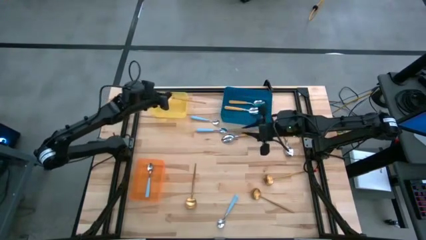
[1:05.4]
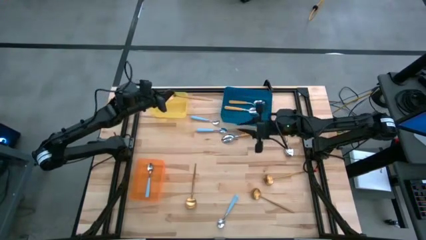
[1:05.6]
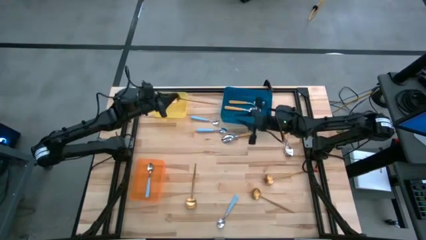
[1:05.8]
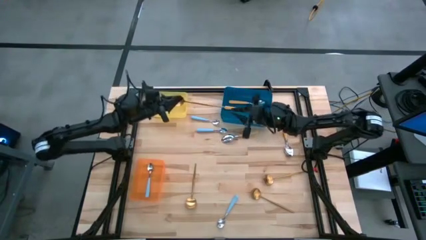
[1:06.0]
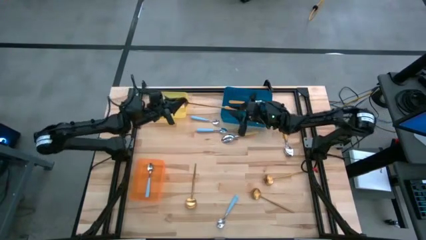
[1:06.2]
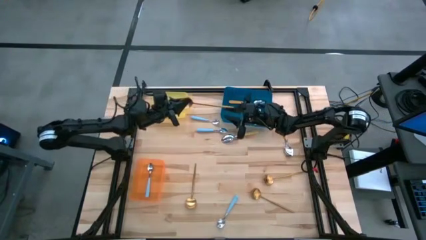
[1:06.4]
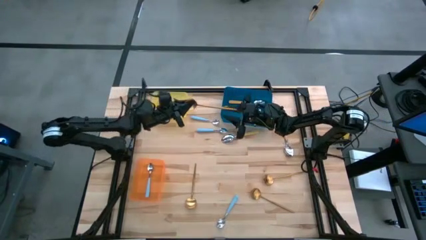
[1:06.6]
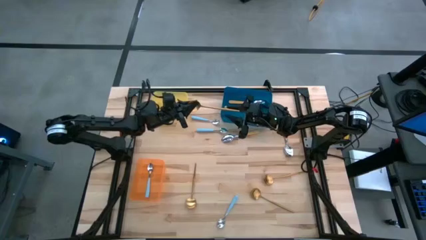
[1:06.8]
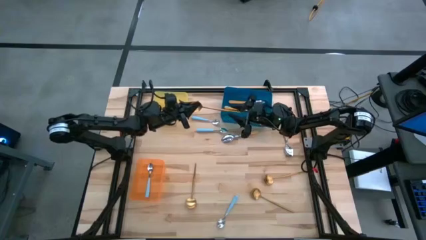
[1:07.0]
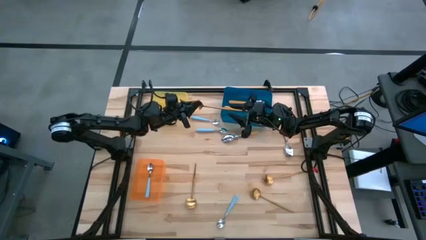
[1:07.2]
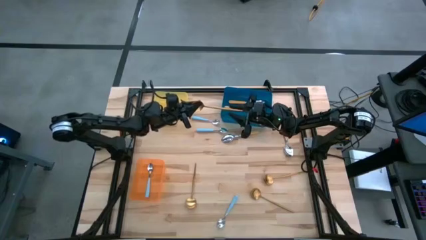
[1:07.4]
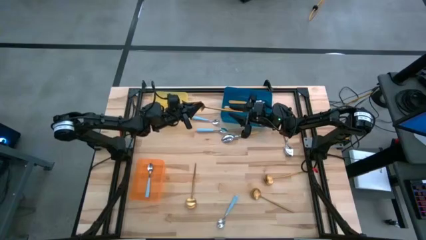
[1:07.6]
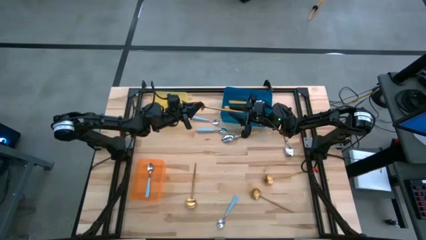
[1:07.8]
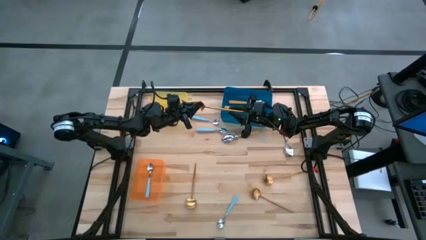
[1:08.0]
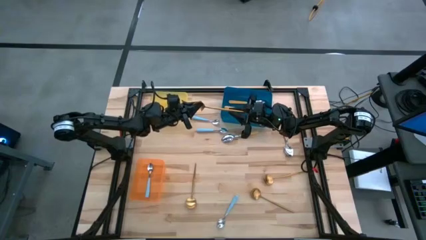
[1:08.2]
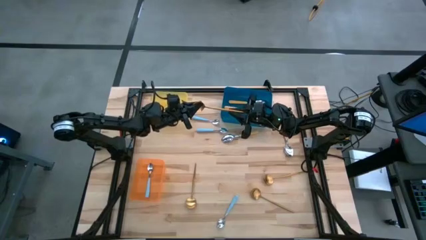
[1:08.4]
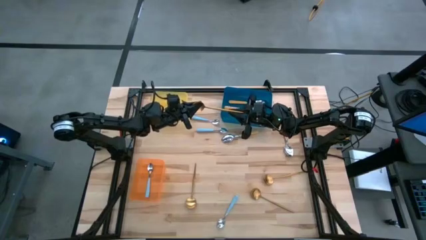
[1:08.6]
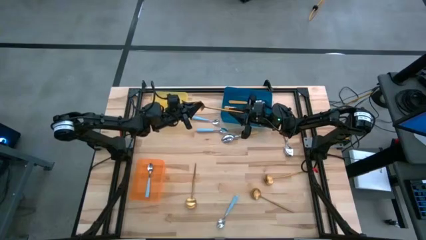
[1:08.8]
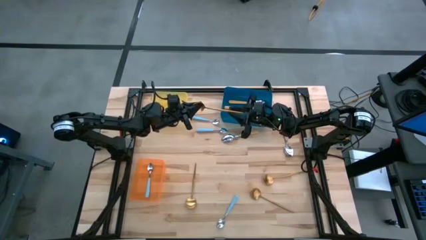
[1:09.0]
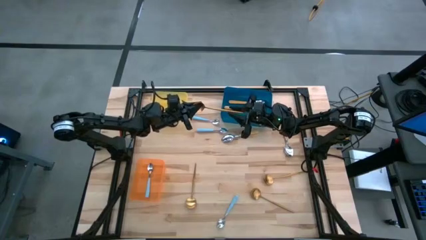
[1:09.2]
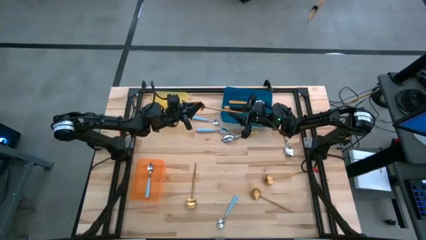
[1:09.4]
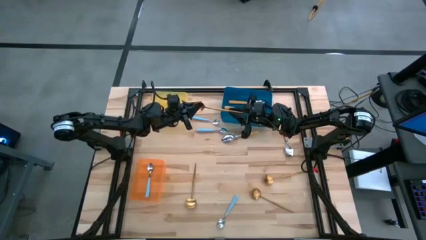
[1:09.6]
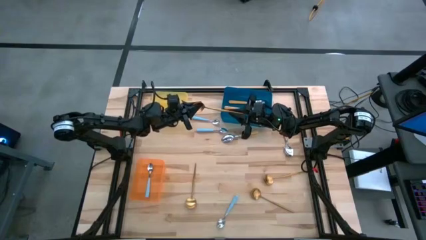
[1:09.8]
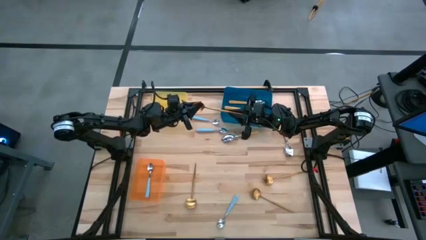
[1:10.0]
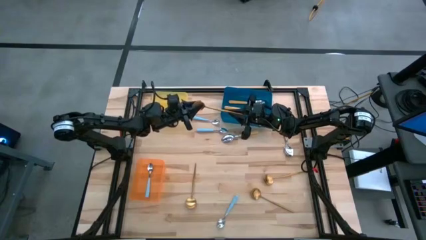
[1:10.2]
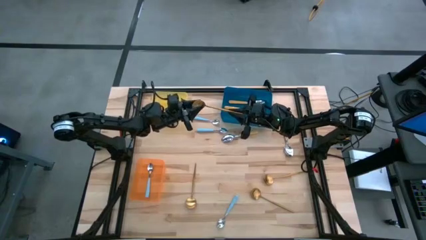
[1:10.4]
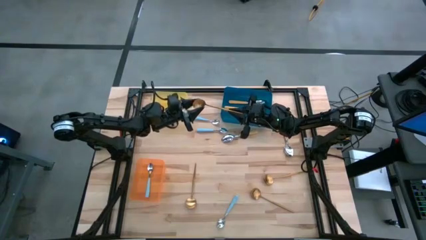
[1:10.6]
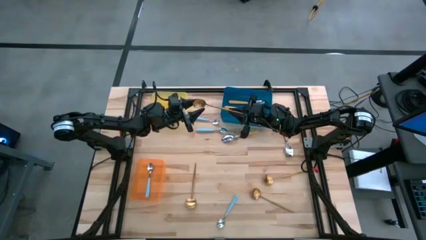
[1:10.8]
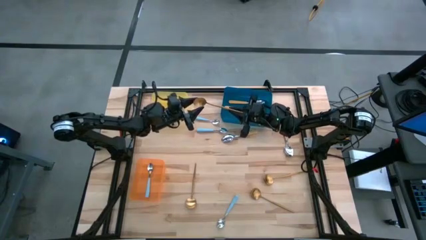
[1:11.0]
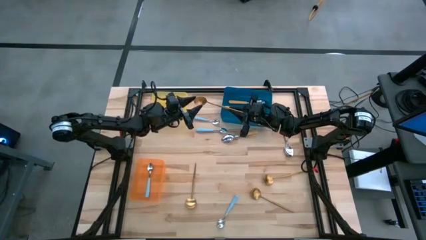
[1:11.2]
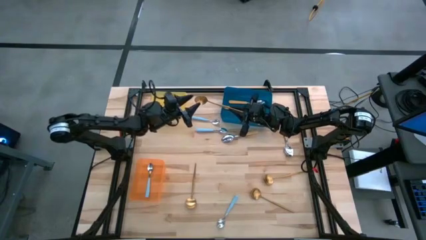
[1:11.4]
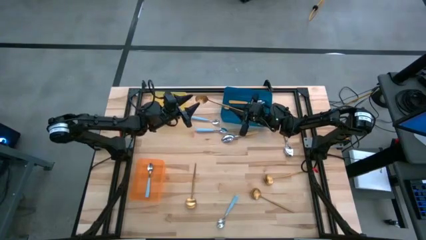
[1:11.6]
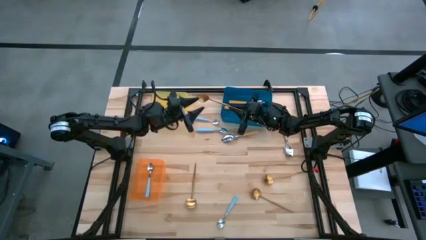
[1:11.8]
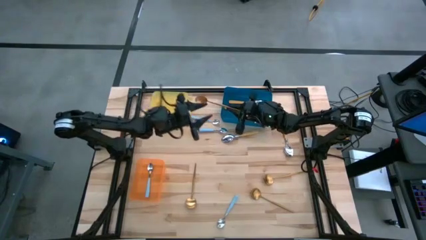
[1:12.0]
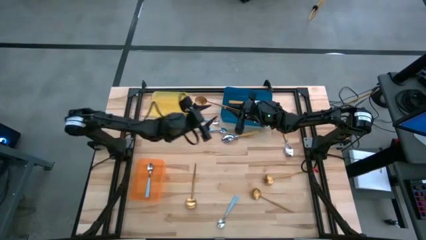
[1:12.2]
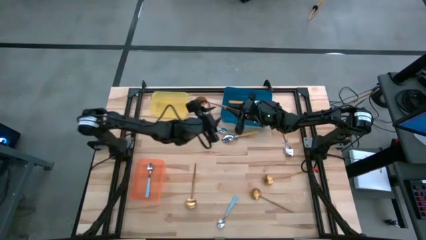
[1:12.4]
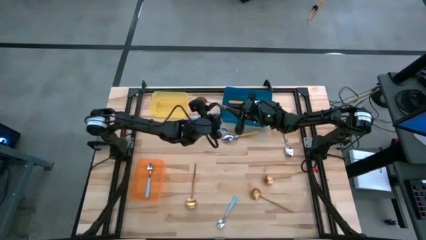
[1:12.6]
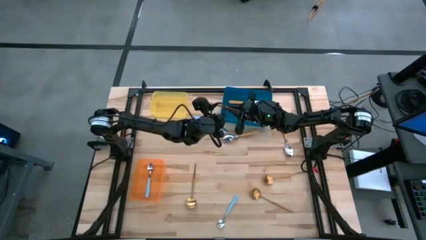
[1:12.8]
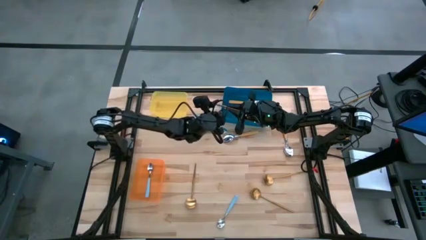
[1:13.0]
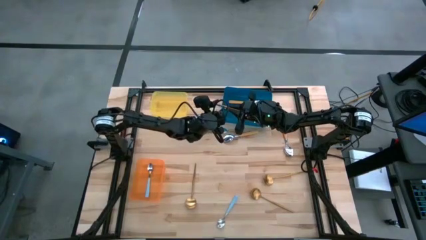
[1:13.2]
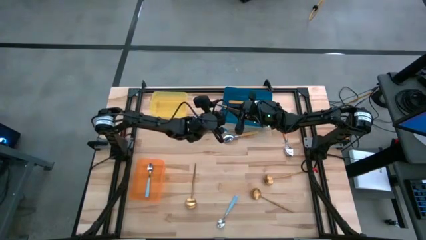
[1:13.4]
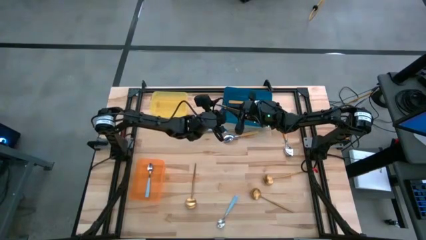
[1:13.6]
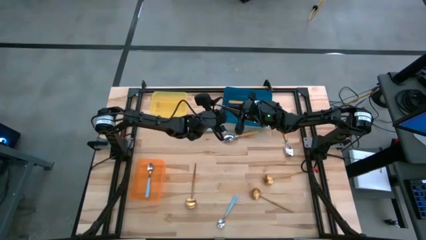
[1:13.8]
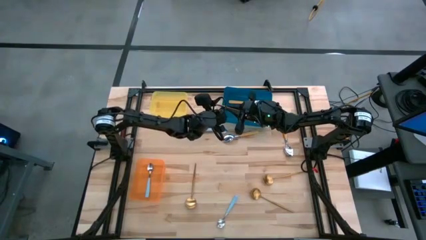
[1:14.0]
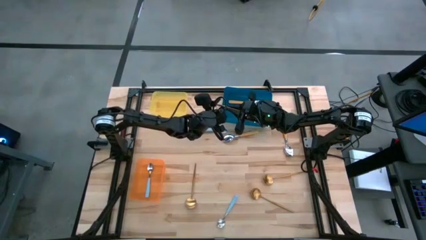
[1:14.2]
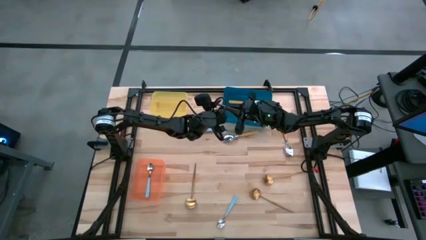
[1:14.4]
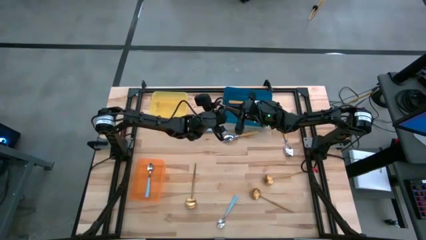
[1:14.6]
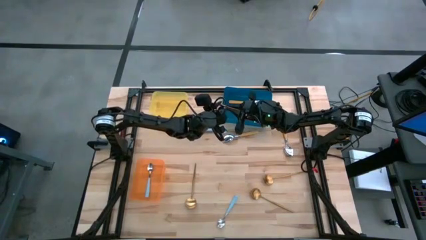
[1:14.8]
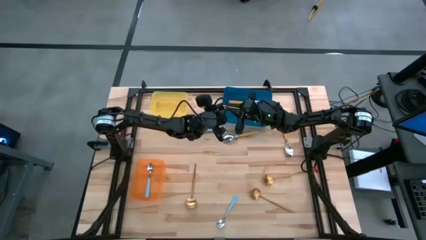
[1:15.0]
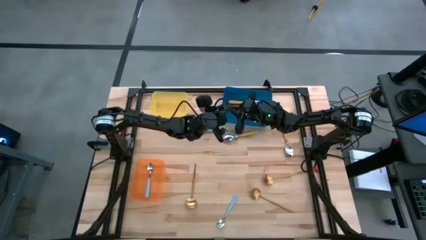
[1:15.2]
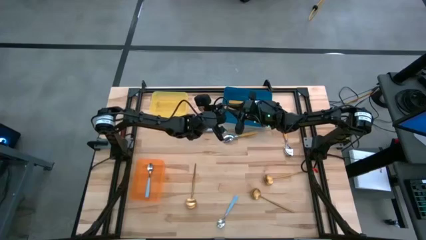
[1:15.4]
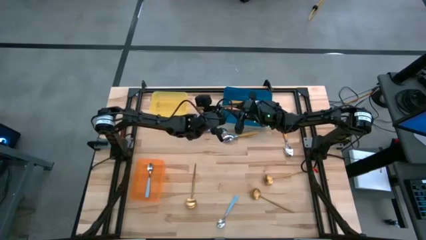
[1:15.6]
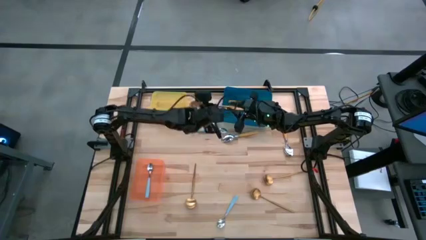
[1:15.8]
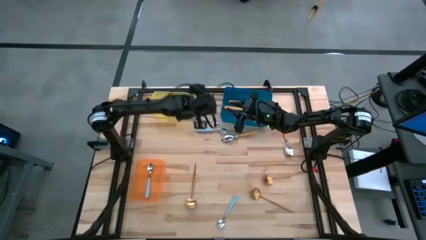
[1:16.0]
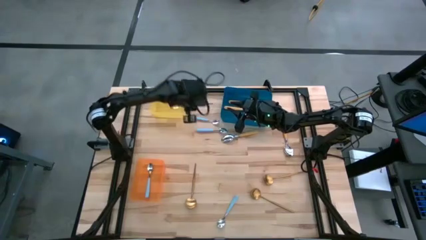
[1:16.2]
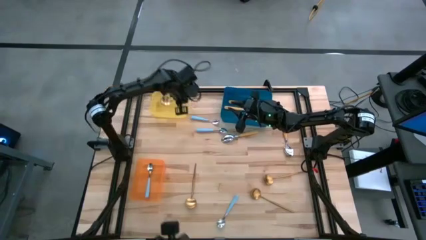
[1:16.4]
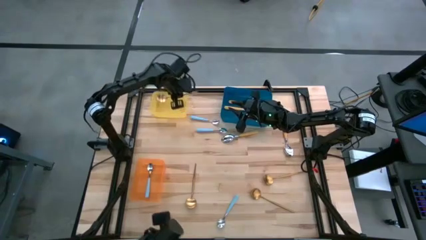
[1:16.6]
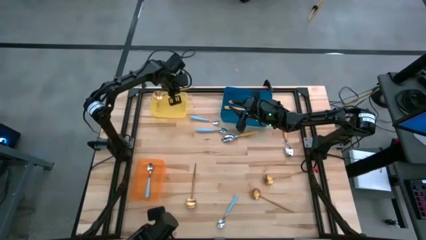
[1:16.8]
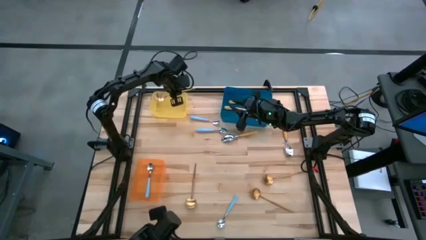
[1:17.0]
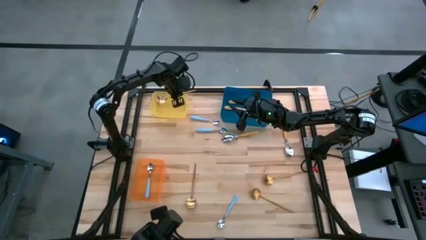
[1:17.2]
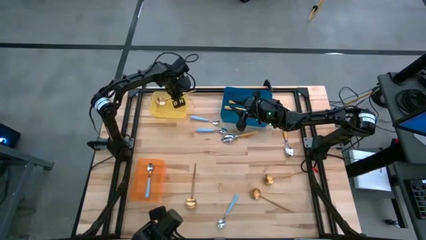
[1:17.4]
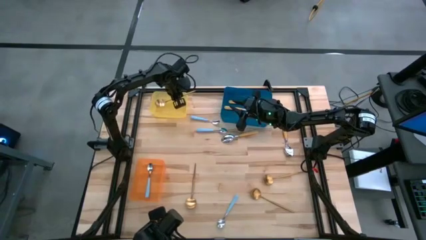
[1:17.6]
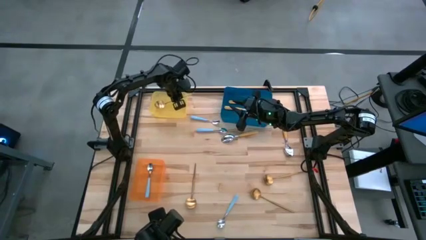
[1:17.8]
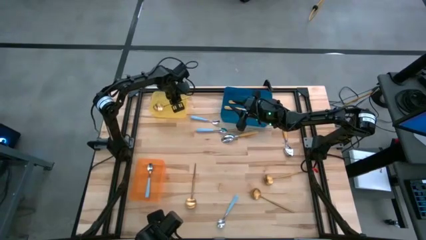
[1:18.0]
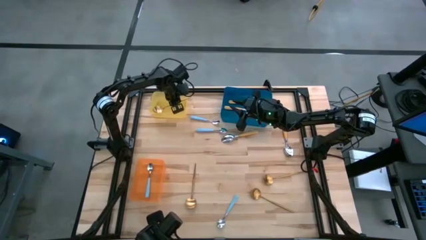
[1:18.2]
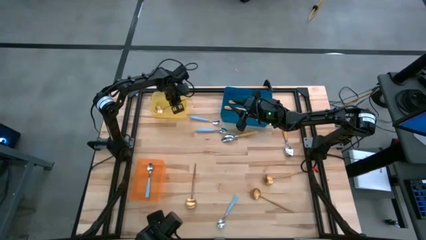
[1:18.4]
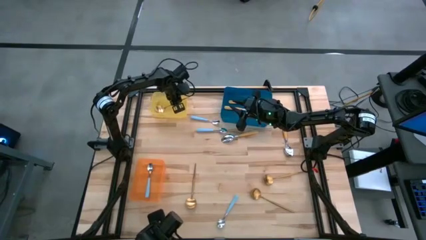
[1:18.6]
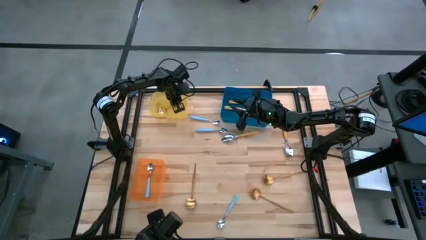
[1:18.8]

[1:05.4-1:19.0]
Task: Sort silverware by color (type)
Put the gold spoon into the yellow bin

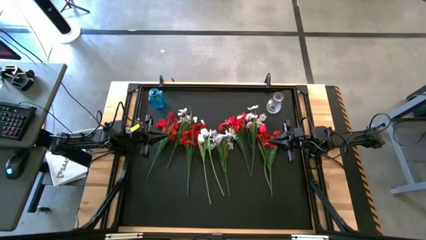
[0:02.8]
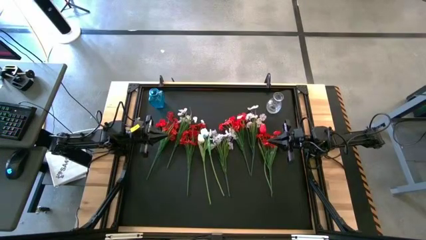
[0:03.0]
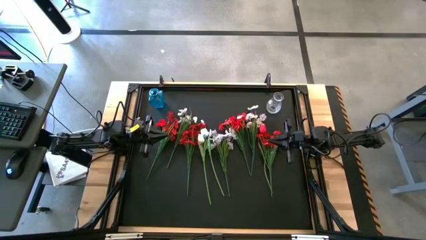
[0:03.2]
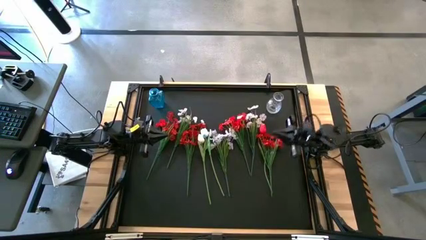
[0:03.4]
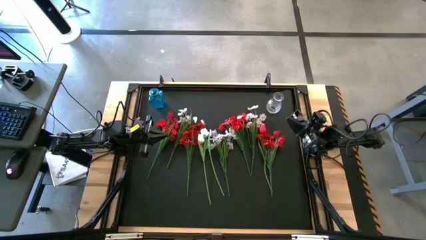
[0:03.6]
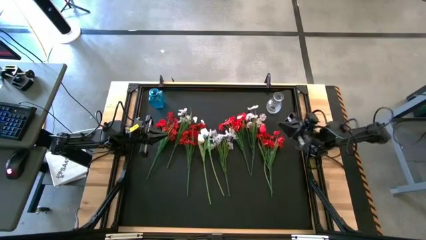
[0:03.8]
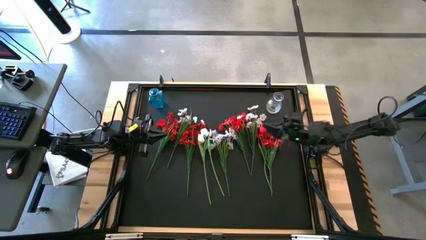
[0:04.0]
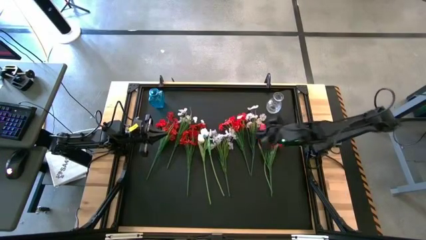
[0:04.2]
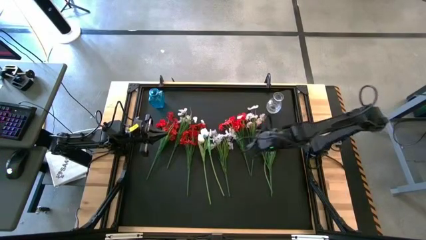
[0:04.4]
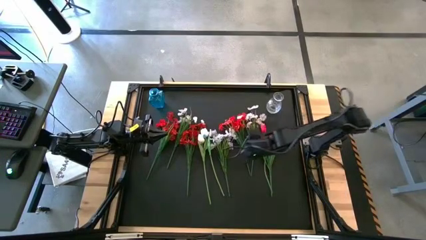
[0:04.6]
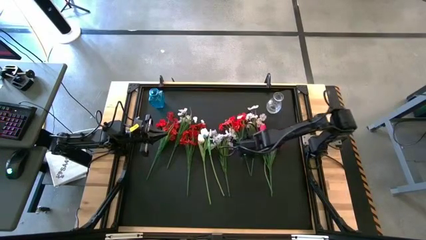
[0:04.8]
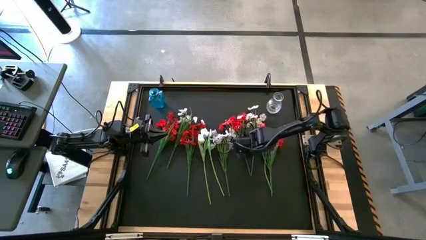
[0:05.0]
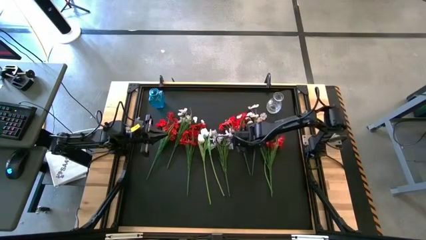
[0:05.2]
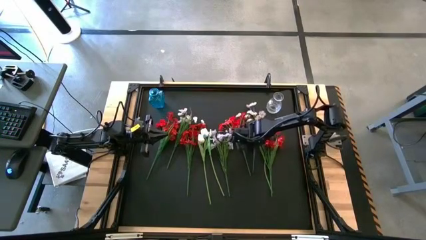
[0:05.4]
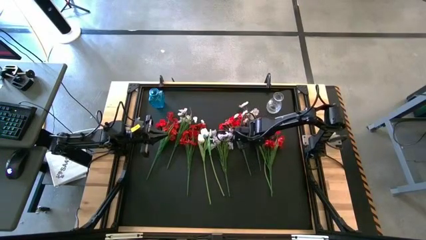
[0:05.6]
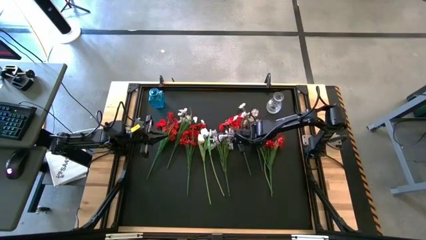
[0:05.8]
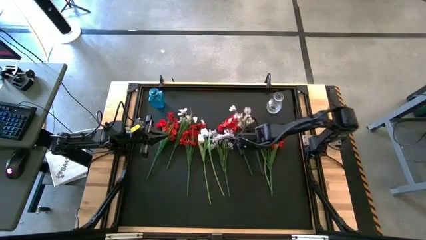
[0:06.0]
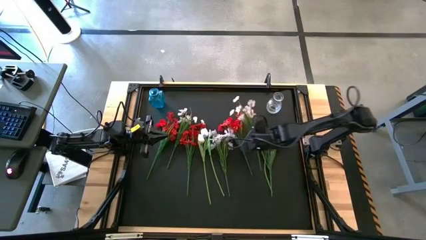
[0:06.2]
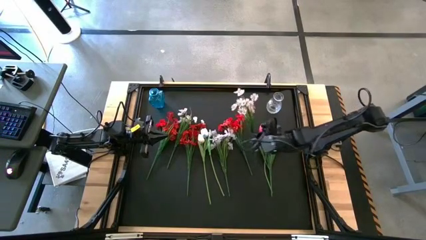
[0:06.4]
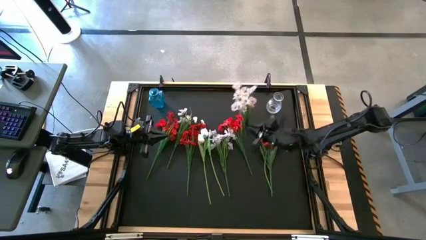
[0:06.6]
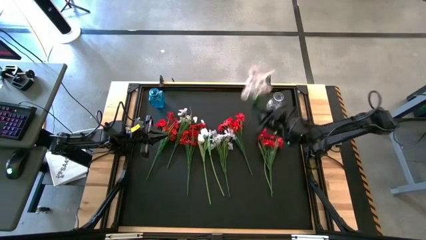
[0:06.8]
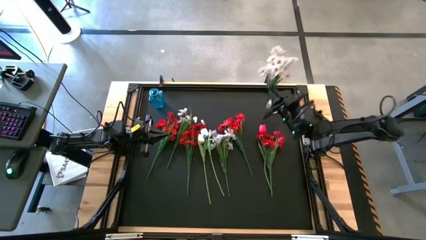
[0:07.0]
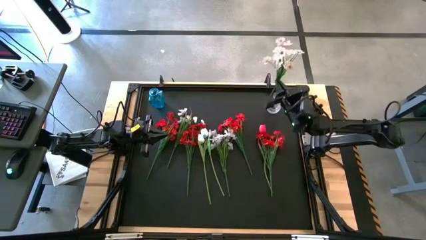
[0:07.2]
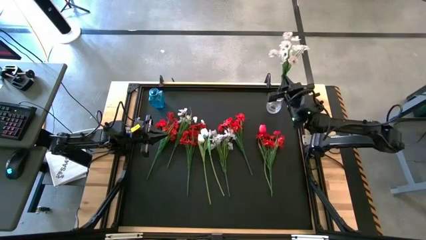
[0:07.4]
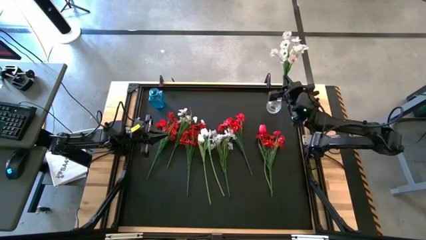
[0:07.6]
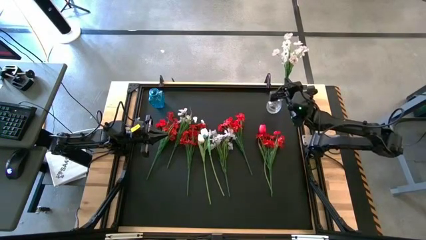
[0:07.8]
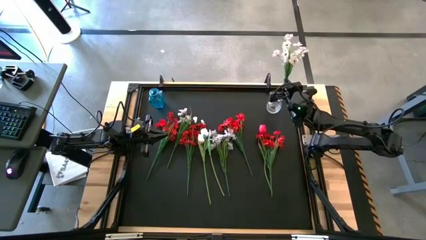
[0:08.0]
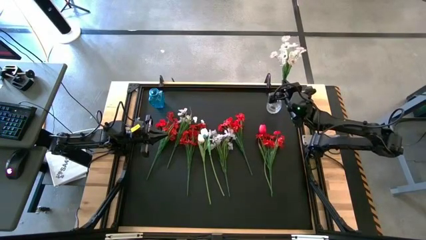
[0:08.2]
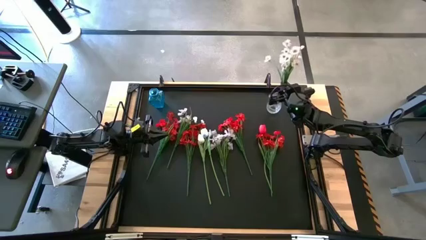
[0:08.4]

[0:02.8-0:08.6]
Task: Sort flowers into vase by color
Put the white orchid into the transparent vase
